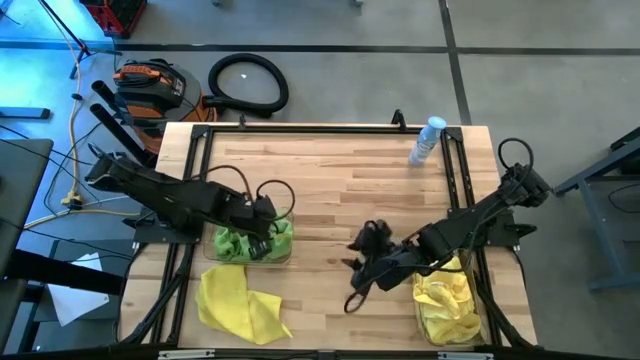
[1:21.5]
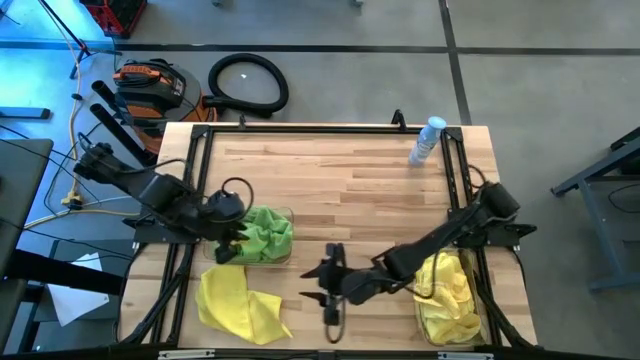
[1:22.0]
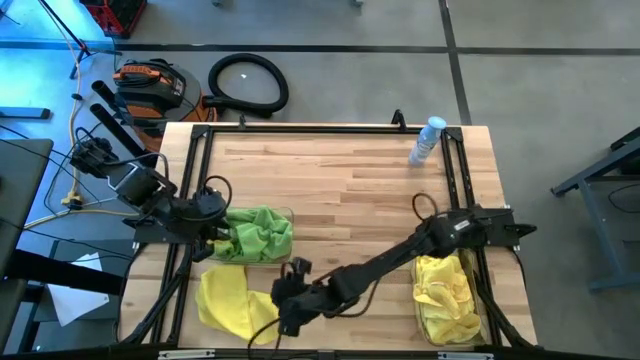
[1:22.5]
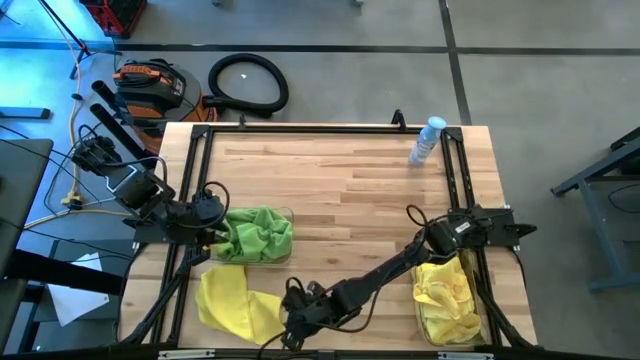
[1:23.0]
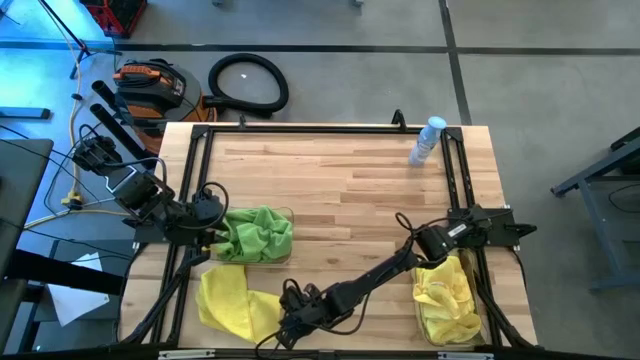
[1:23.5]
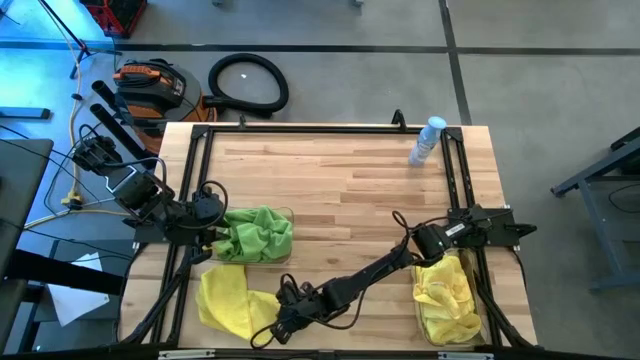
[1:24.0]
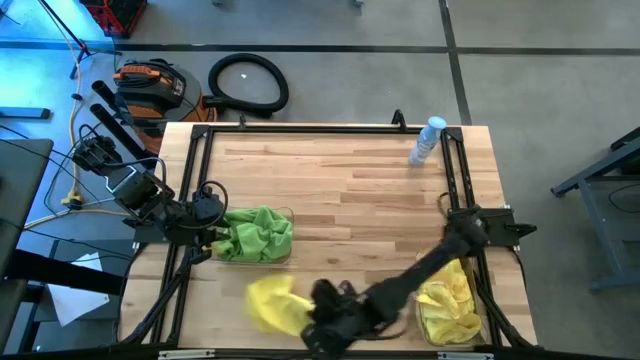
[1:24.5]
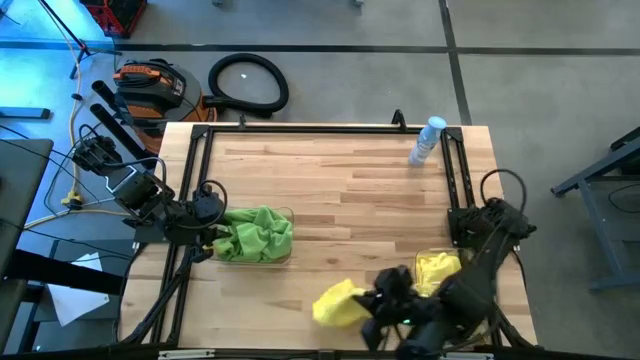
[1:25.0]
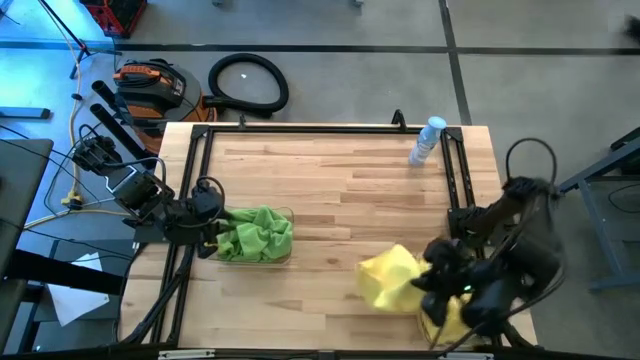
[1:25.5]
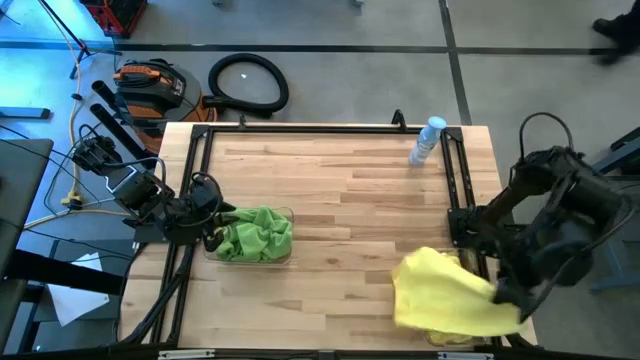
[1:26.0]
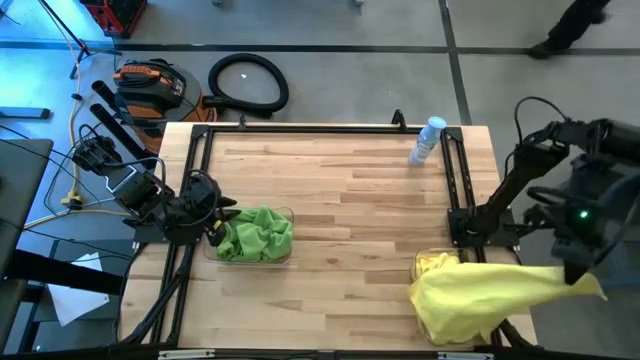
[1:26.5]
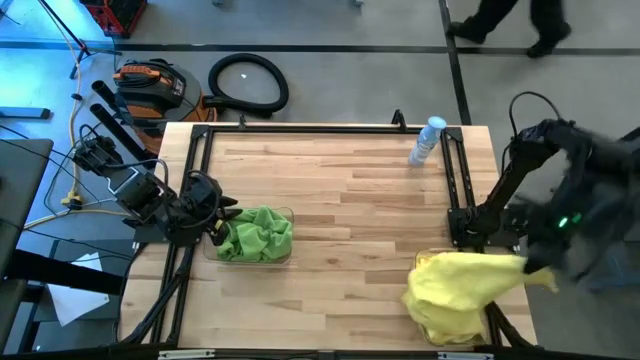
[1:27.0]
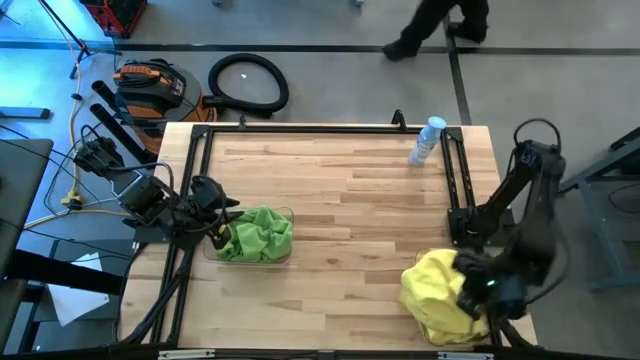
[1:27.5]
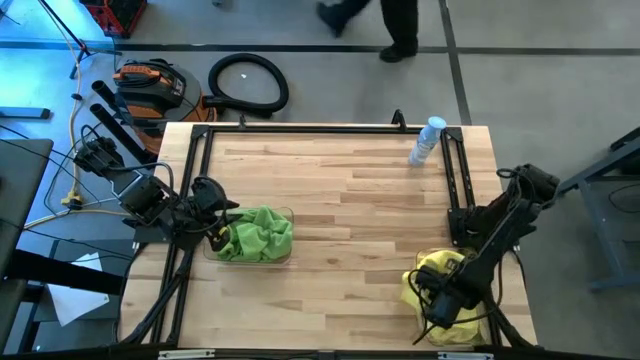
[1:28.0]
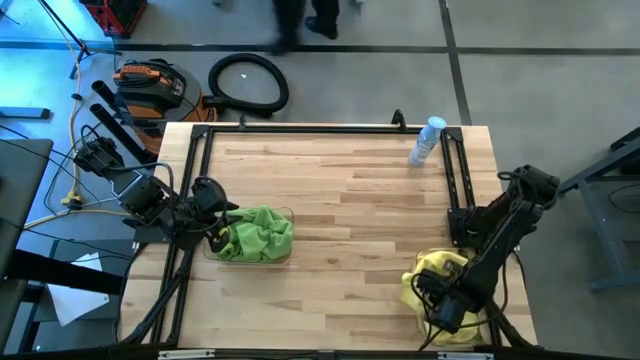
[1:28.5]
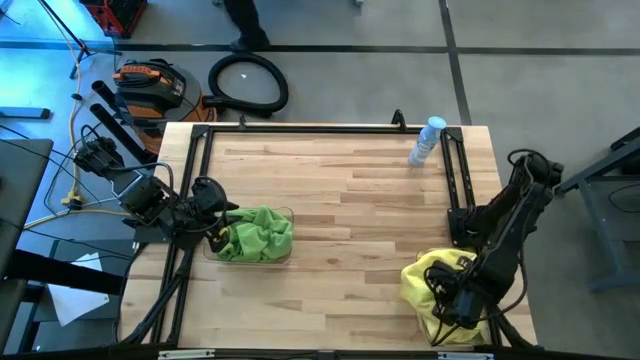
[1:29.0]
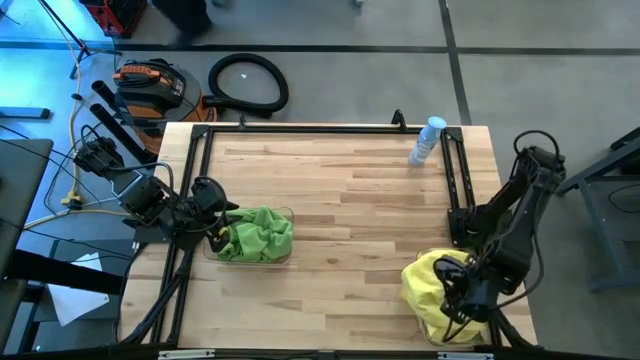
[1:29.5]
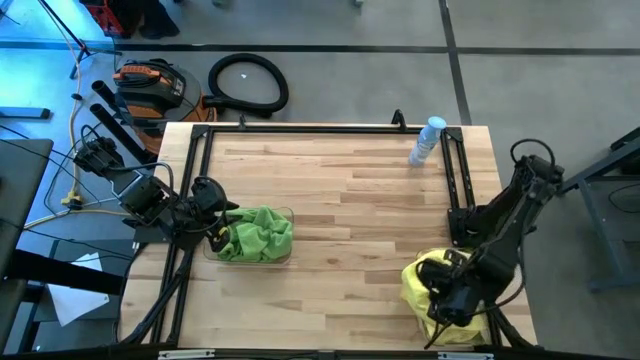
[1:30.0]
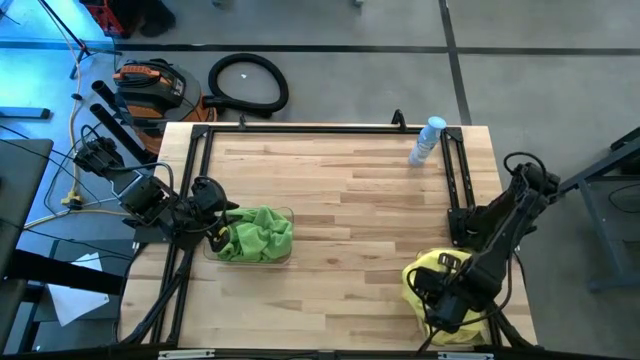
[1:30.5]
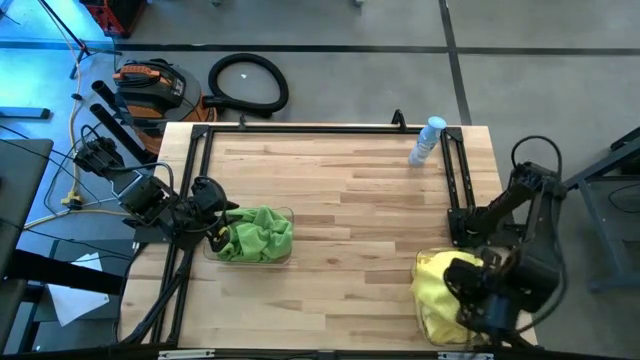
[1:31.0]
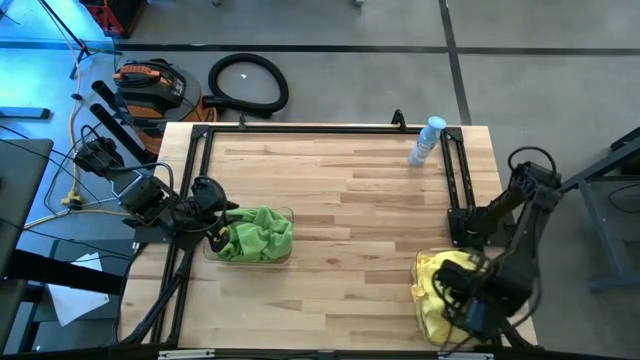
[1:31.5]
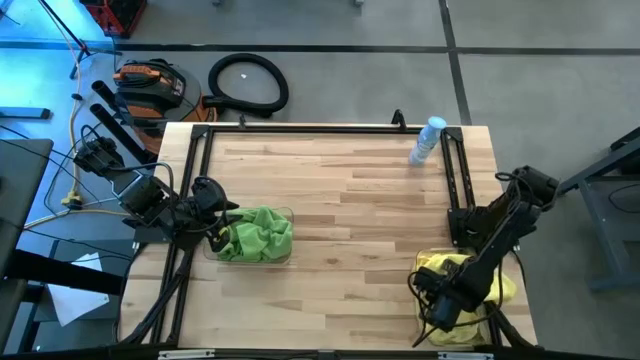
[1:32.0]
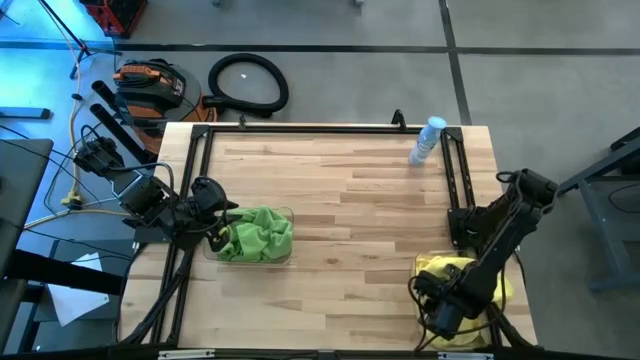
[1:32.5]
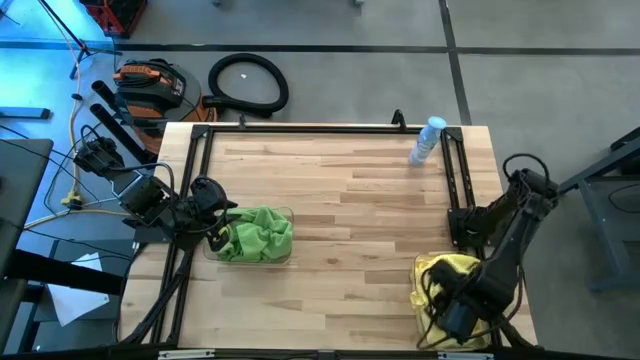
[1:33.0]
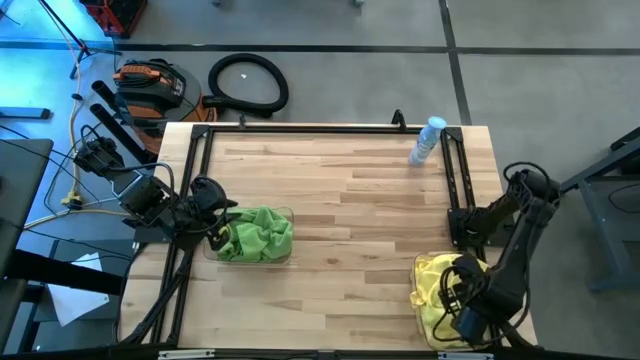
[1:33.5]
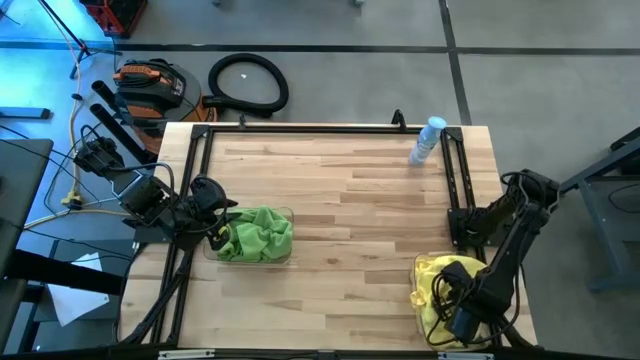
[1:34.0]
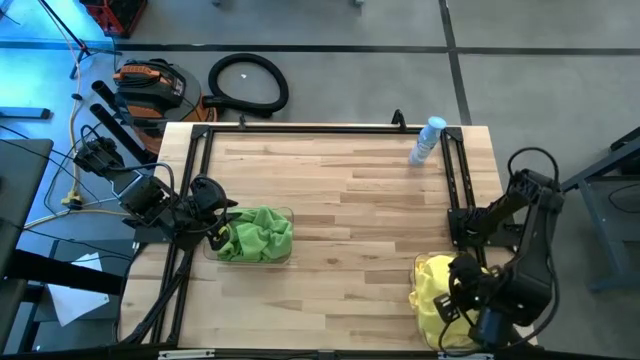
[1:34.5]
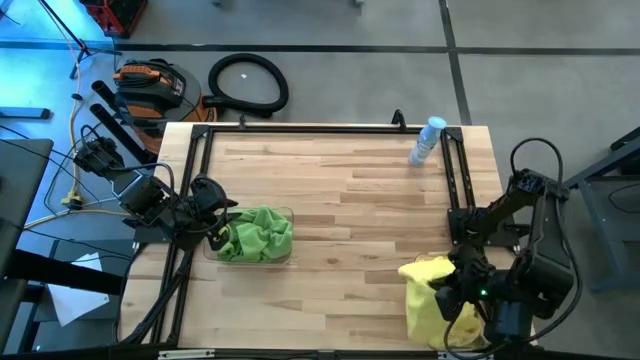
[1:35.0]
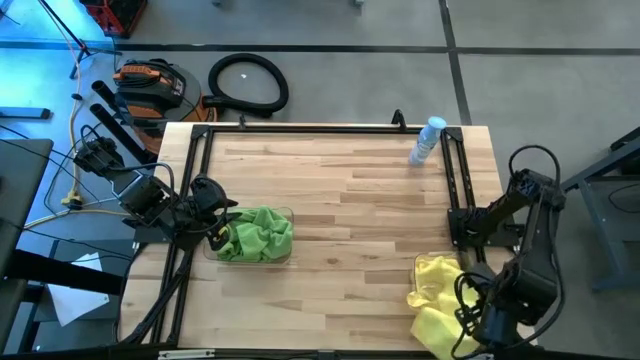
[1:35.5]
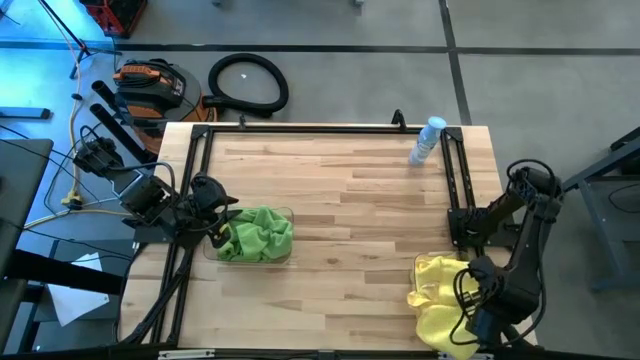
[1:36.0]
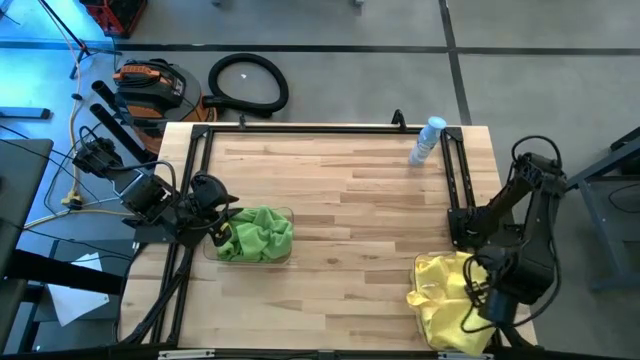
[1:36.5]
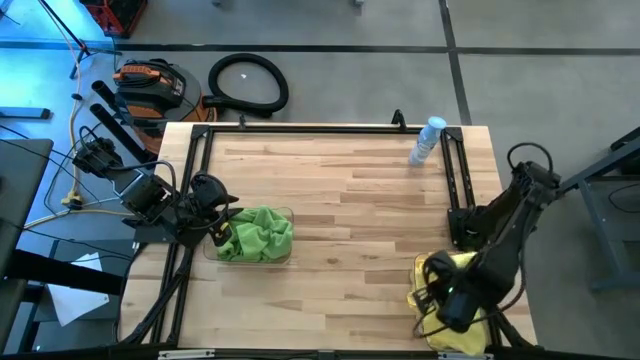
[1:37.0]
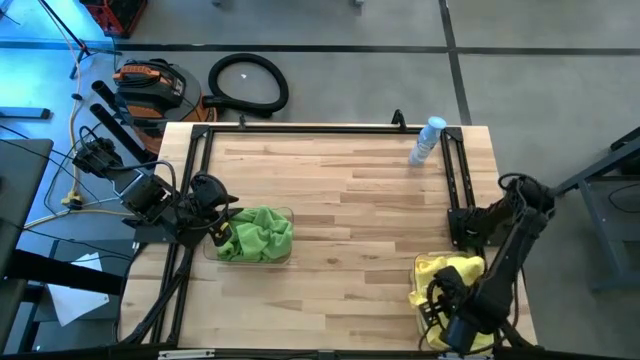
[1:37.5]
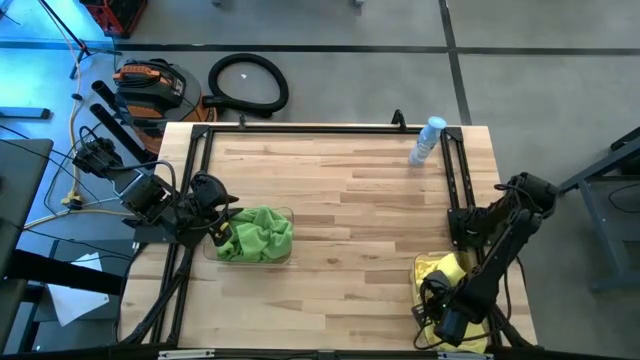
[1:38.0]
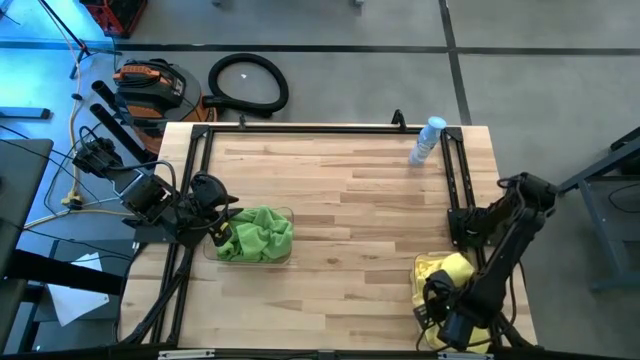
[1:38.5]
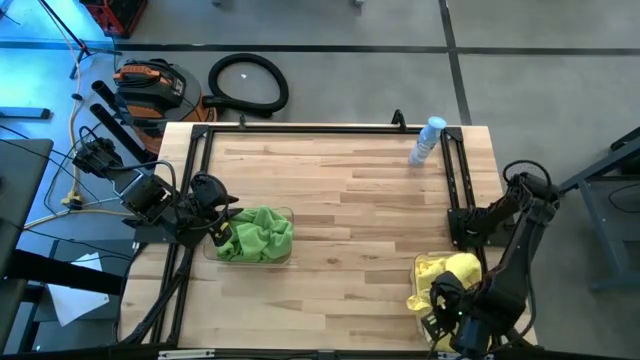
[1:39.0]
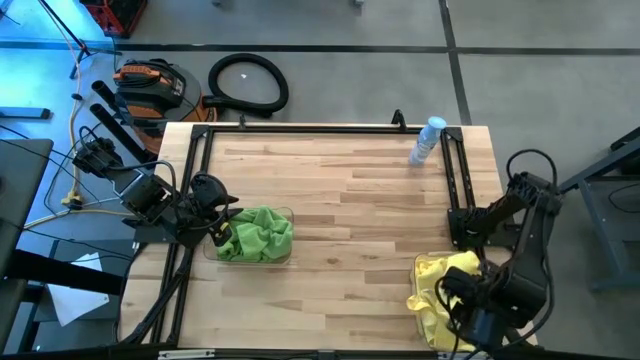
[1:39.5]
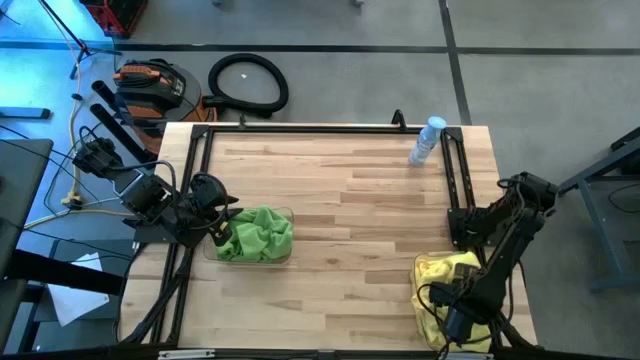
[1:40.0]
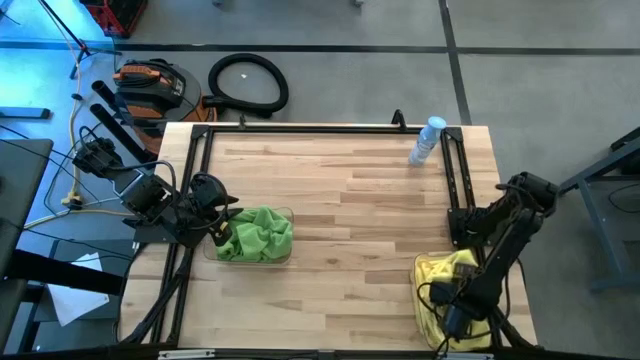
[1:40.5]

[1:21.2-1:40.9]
Task: Sort microfiber towel by color & place in baskets
Put the yellow towel into the right transparent bin
